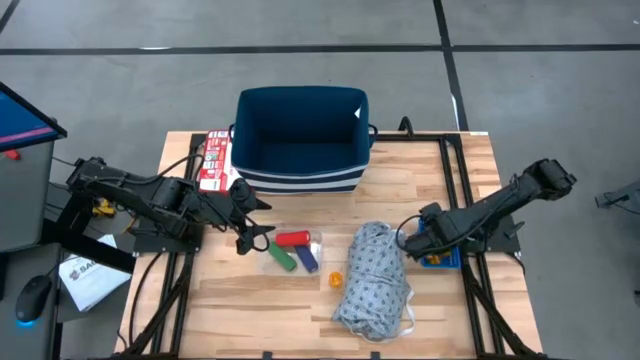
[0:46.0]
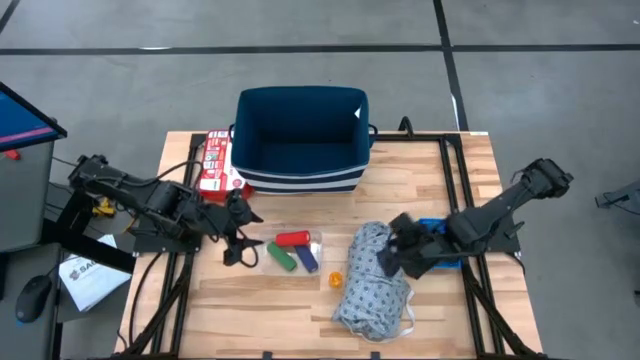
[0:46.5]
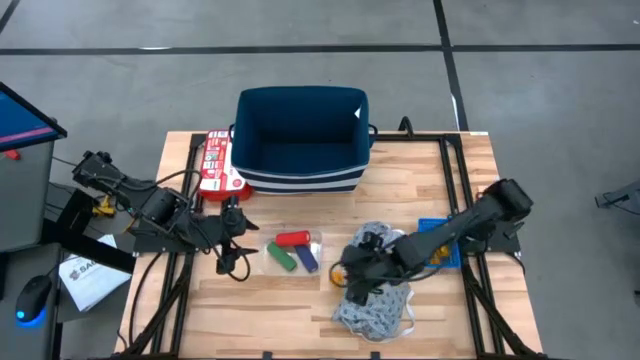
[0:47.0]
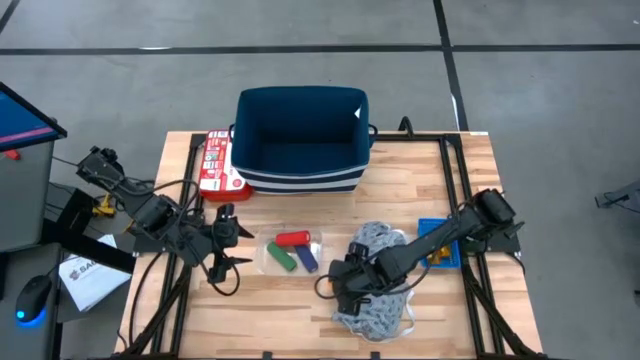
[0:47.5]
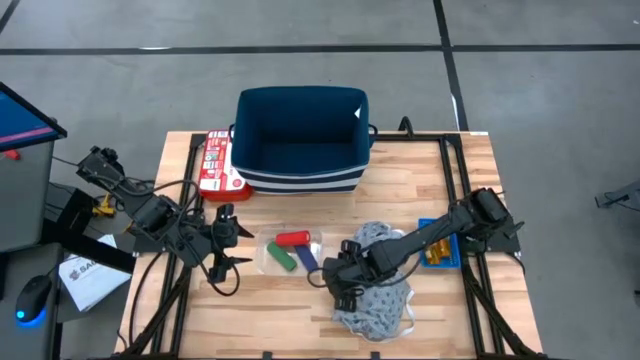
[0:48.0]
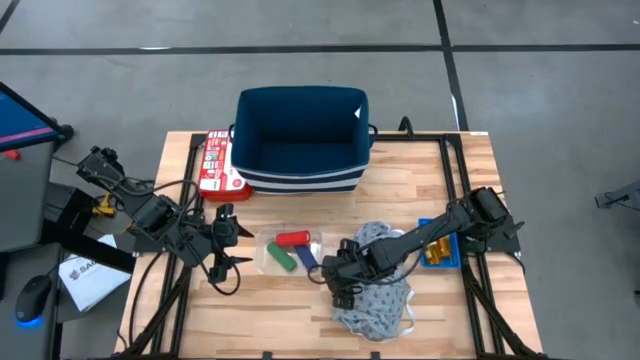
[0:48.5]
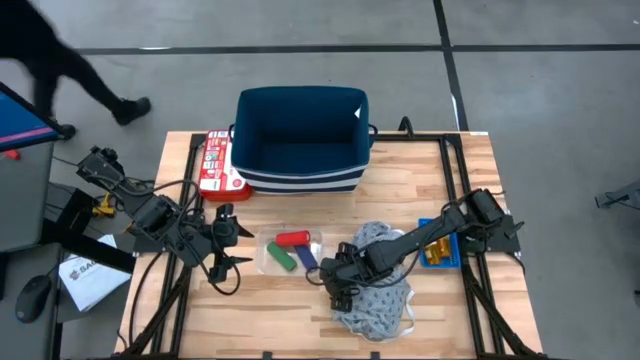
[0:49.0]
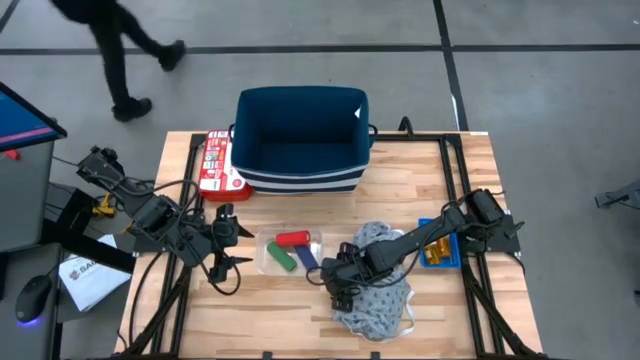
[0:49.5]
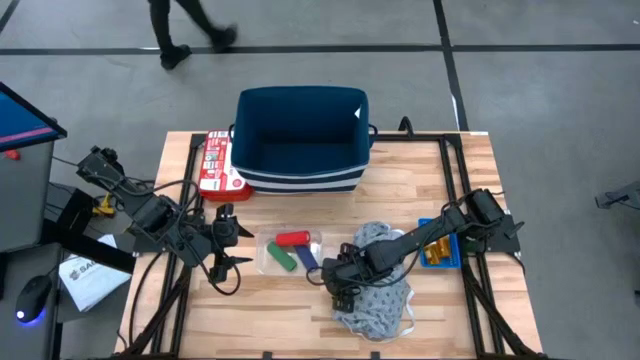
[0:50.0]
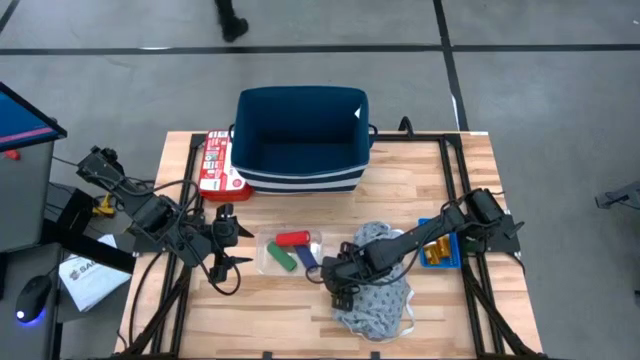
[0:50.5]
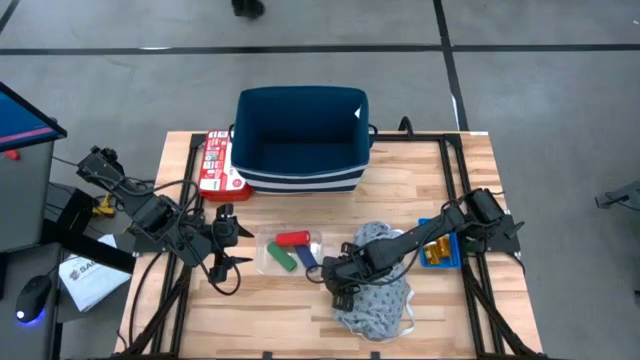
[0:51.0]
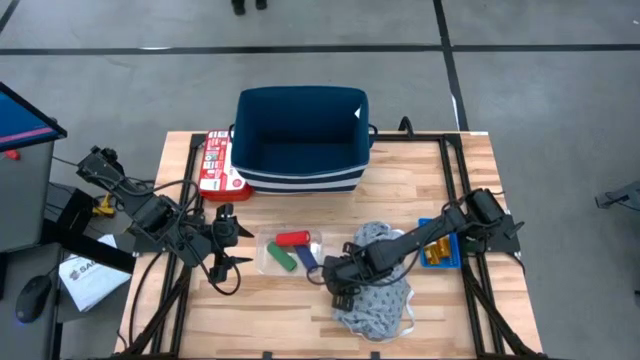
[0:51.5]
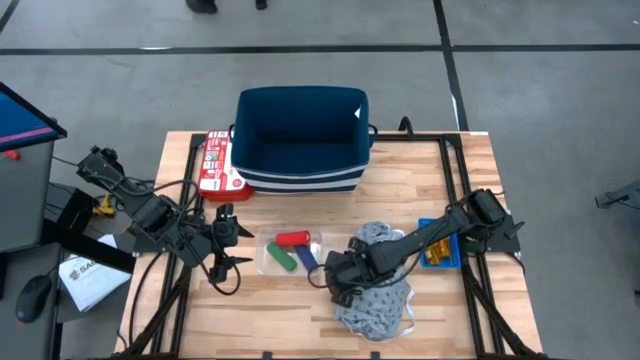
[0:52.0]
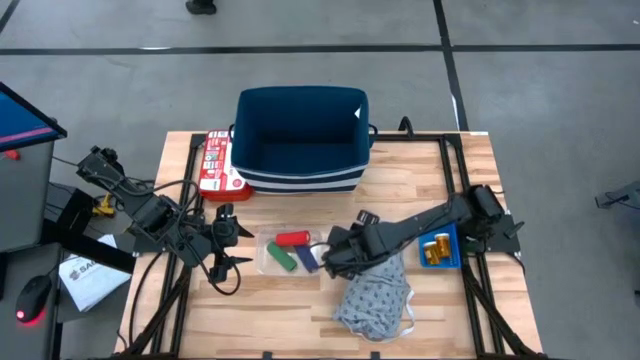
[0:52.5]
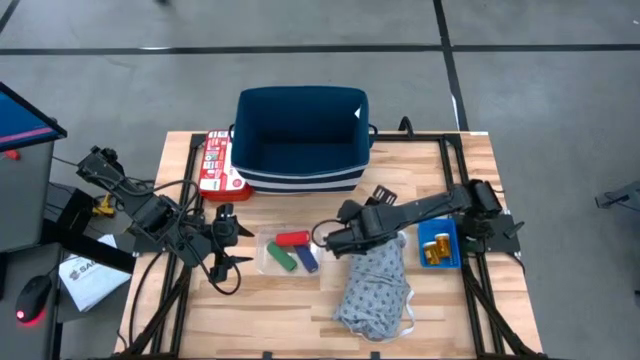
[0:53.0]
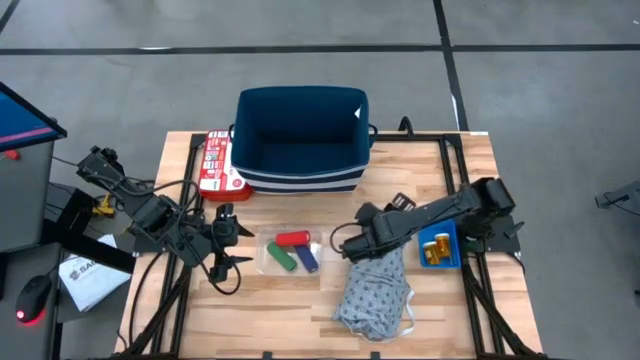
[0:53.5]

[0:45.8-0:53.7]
Task: Pick & place medical supplies in basket/bin
Put the orange pill bottle into the small blue bin

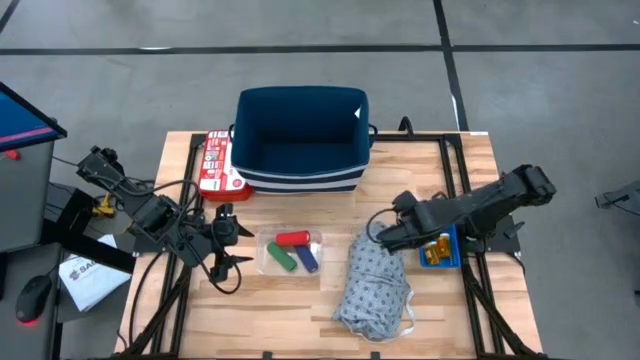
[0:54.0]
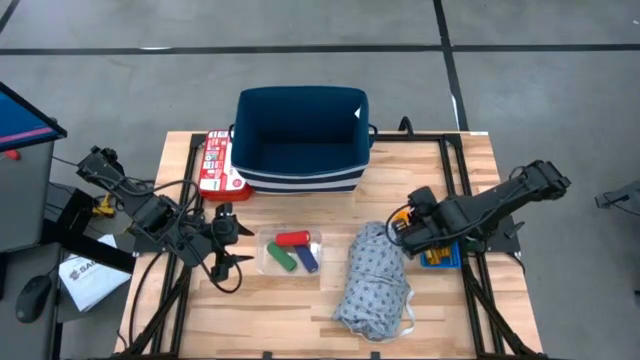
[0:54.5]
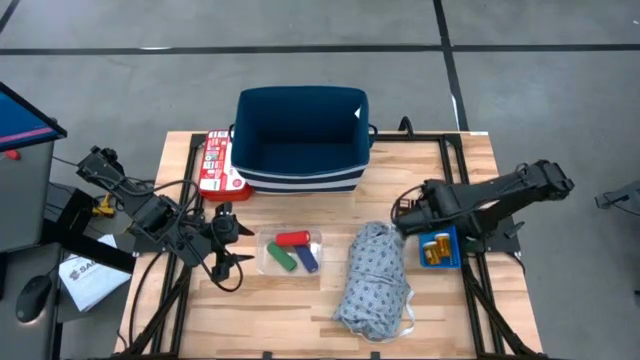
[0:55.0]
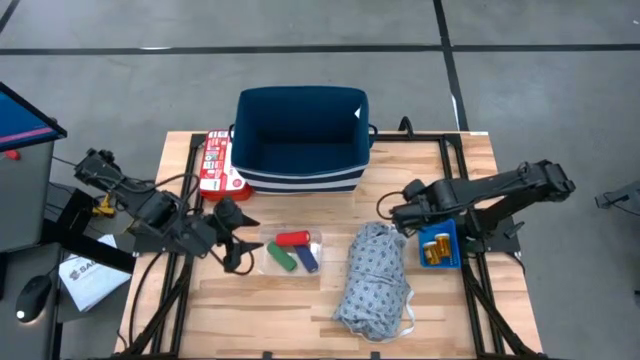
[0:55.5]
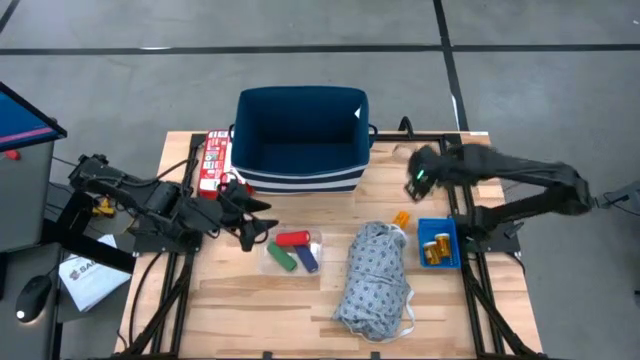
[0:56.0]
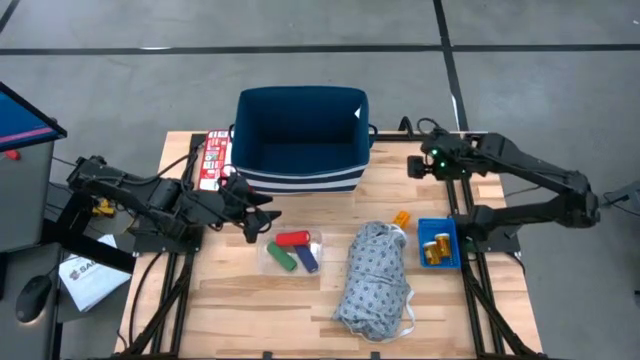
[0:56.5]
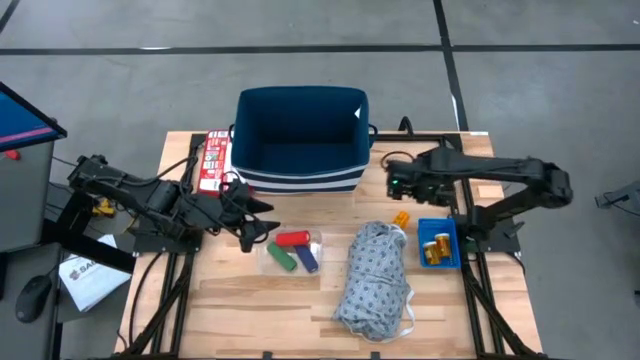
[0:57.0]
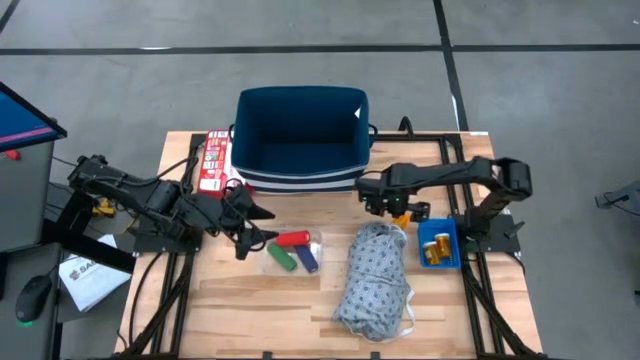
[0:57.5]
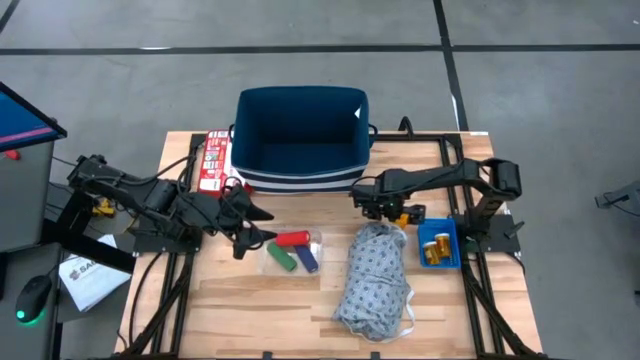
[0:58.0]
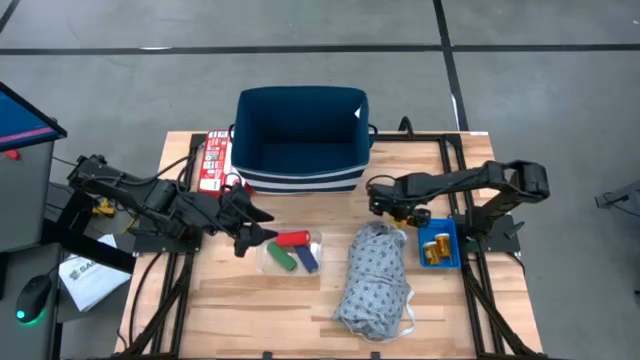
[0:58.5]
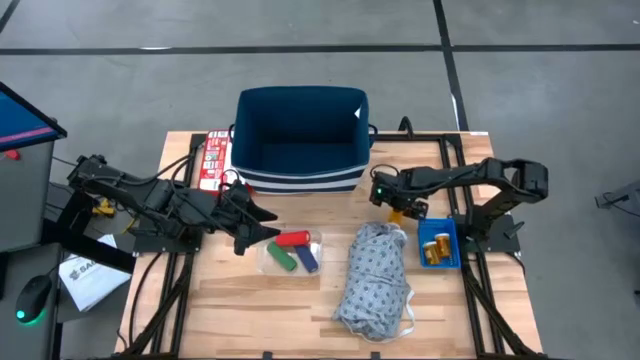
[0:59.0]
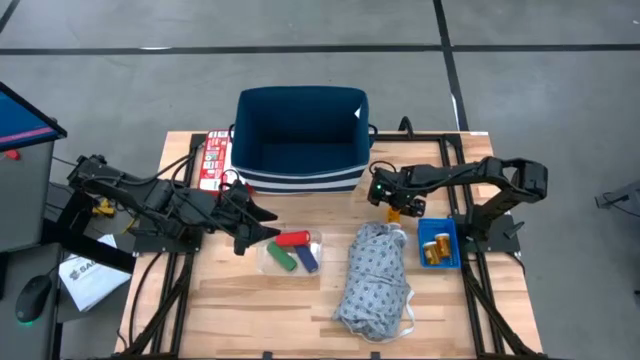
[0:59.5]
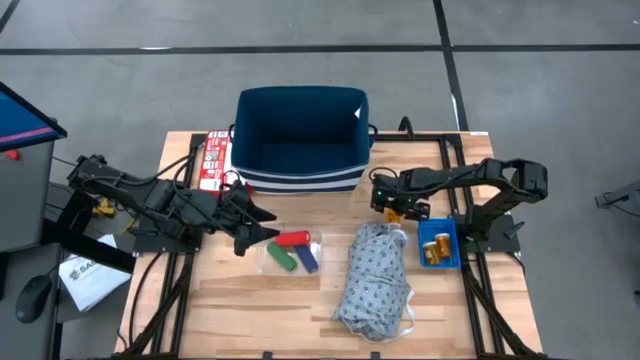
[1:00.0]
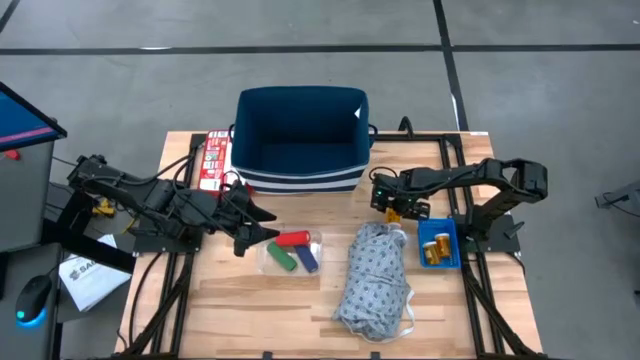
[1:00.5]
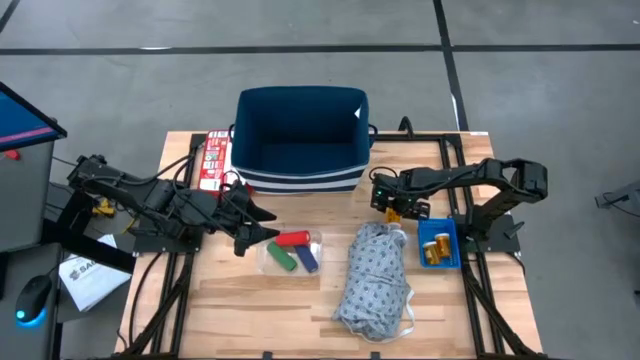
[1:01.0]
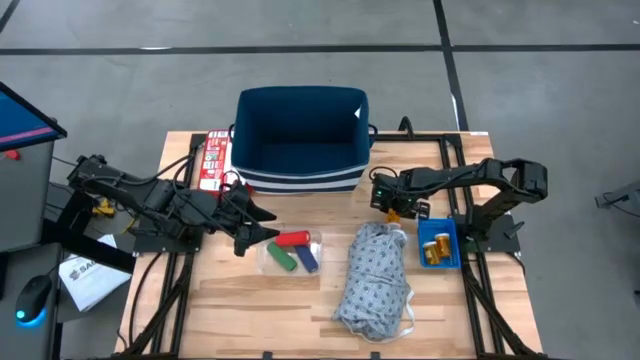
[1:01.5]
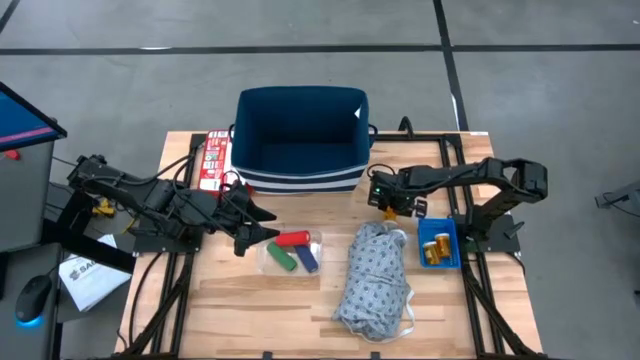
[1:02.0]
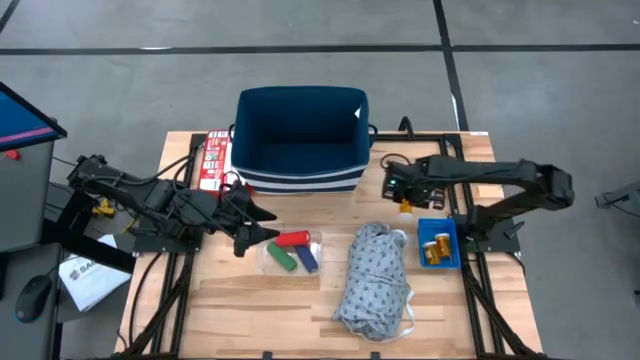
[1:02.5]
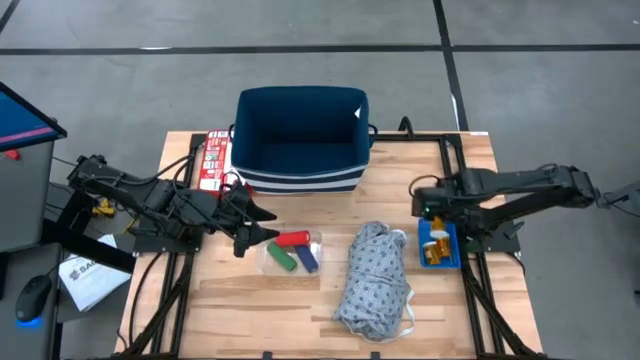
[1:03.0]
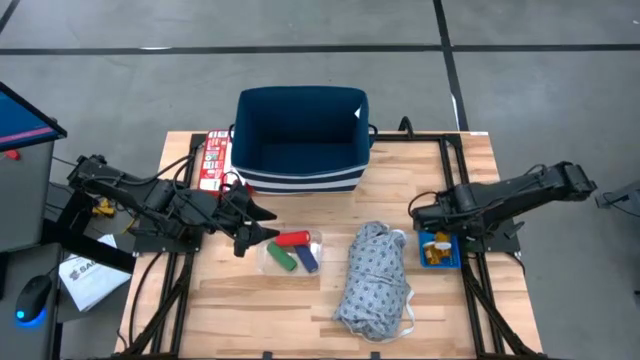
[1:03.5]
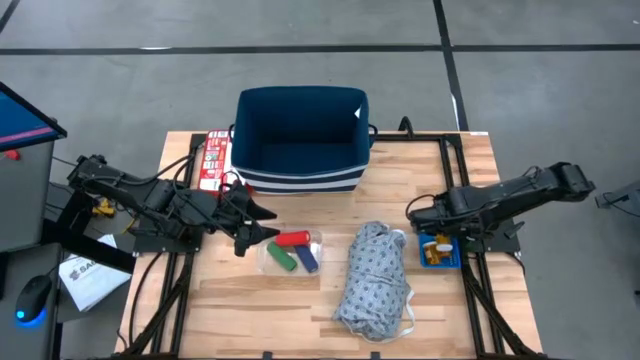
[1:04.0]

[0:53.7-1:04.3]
Put the orange pill bottle into the small blue bin

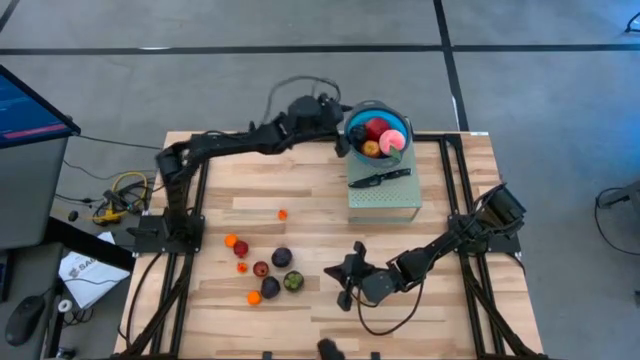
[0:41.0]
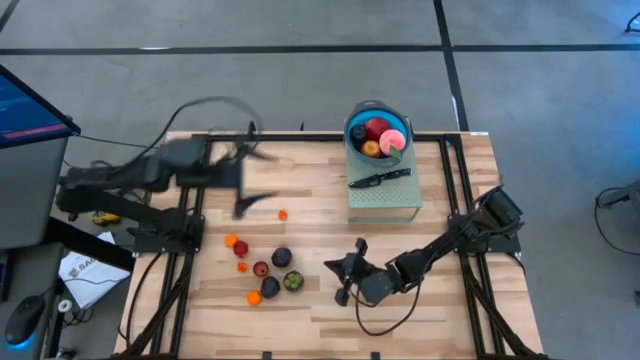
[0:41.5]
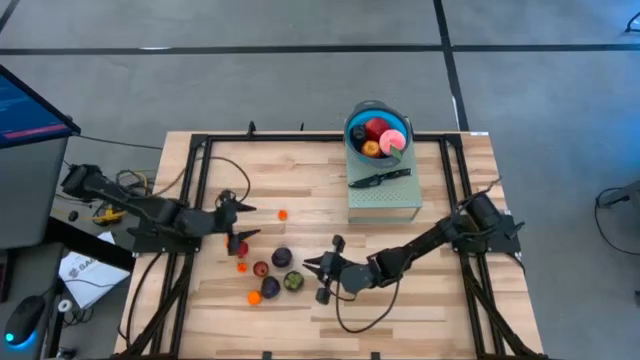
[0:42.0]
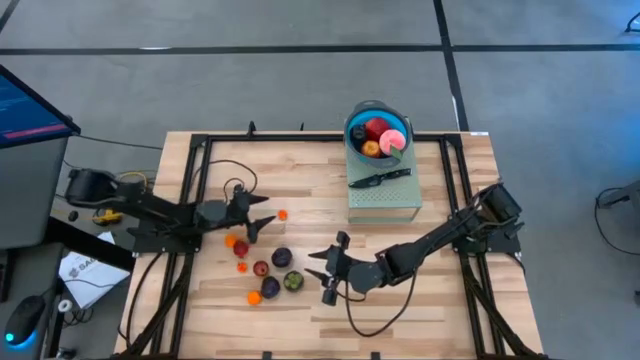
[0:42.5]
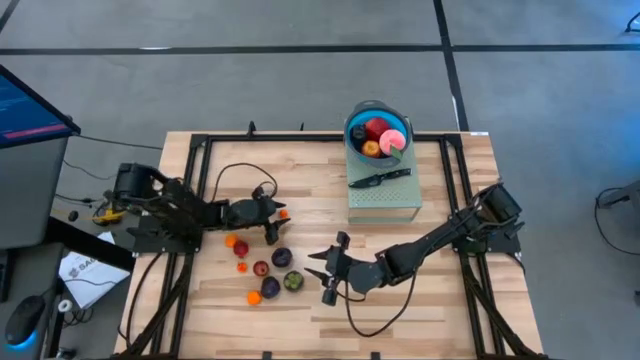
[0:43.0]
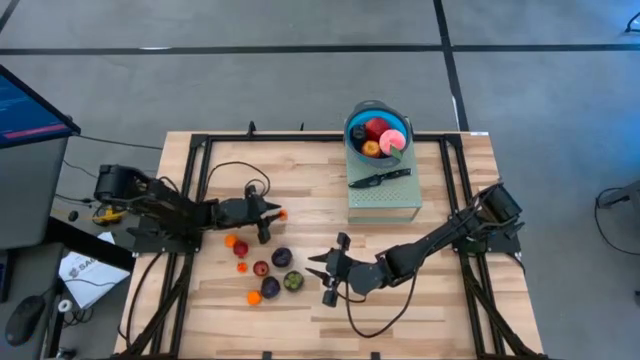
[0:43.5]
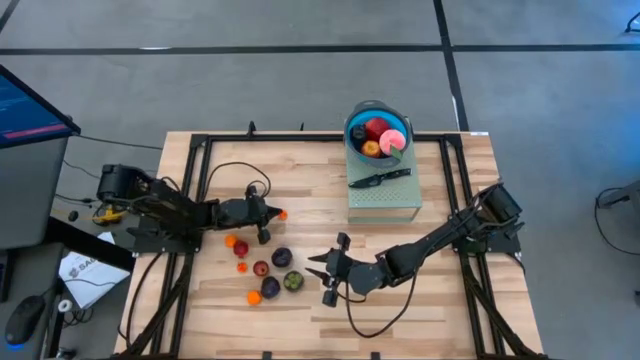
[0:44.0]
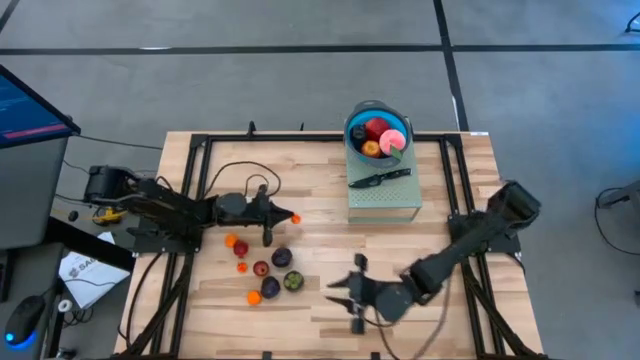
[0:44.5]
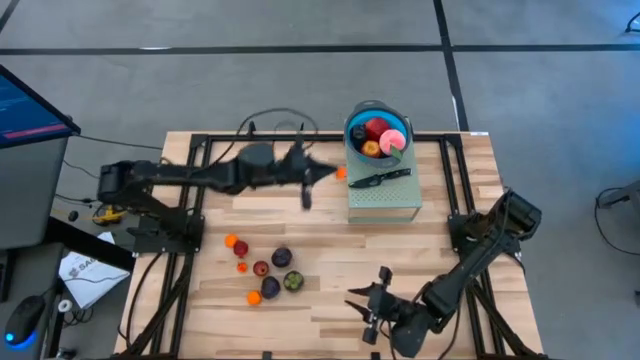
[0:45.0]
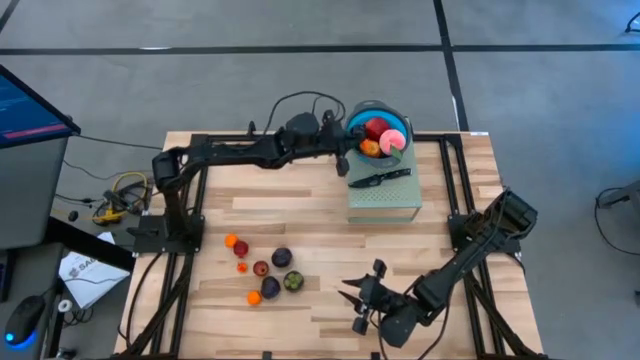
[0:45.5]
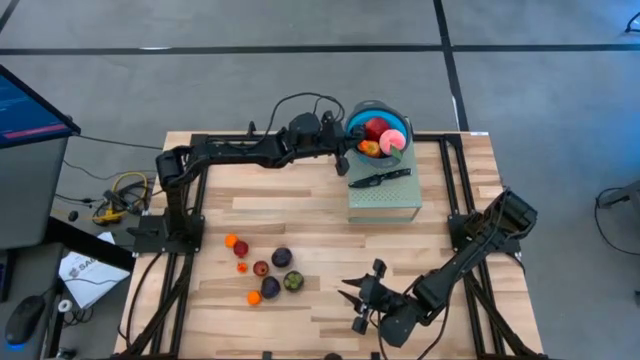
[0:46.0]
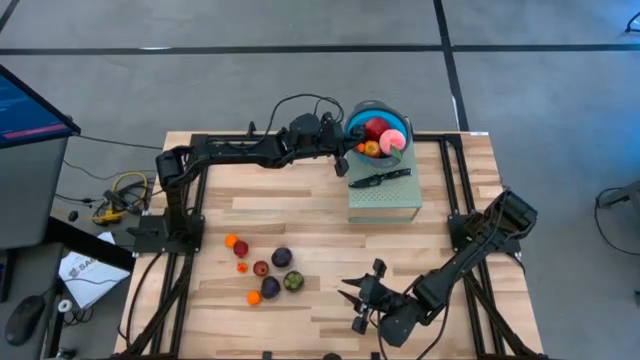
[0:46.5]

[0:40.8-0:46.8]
Task: Pick & Place Fruit
Put the top orange peach into the blue strainer bowl on the shelf
